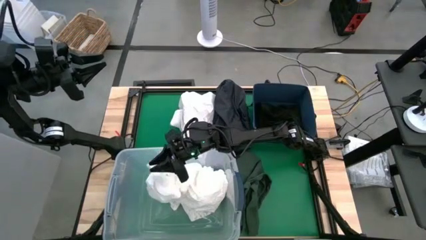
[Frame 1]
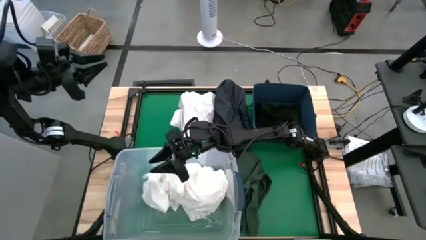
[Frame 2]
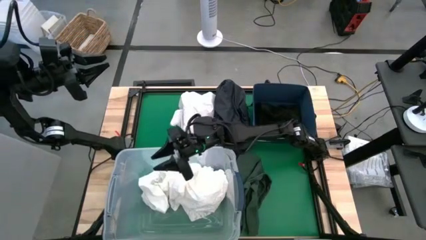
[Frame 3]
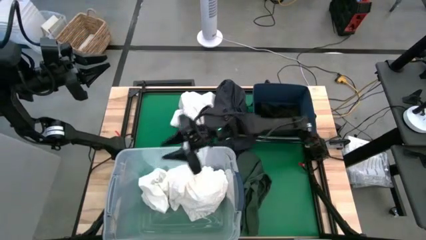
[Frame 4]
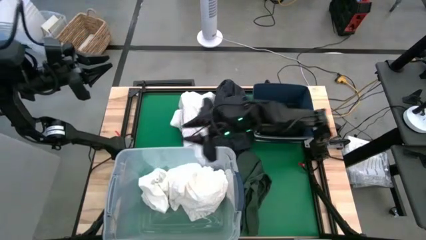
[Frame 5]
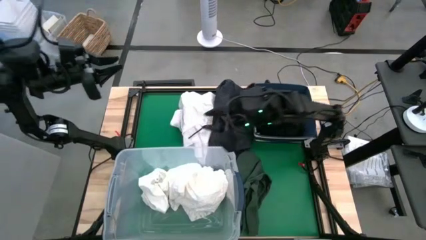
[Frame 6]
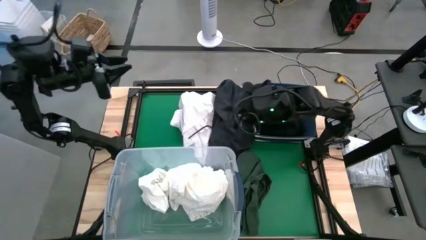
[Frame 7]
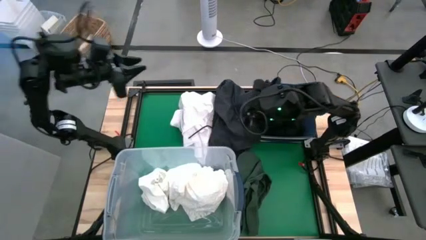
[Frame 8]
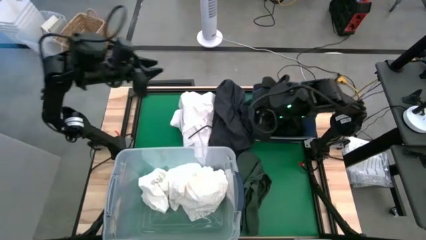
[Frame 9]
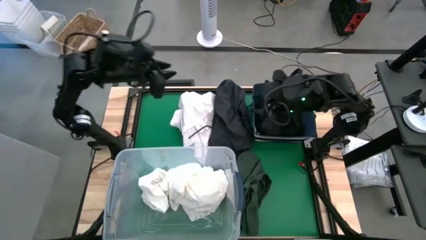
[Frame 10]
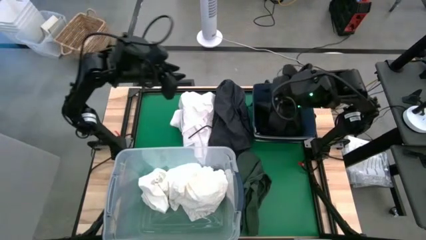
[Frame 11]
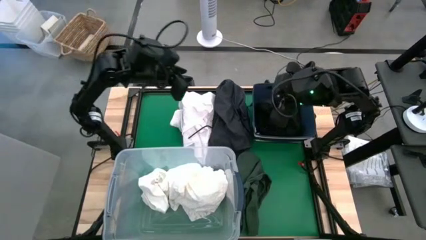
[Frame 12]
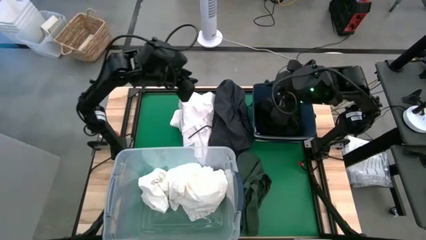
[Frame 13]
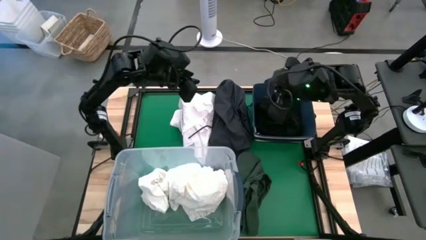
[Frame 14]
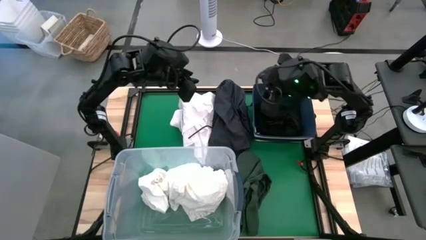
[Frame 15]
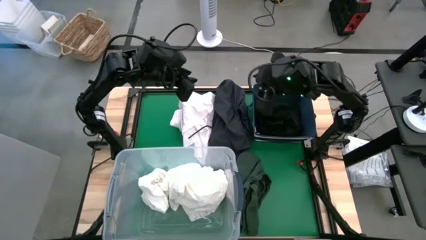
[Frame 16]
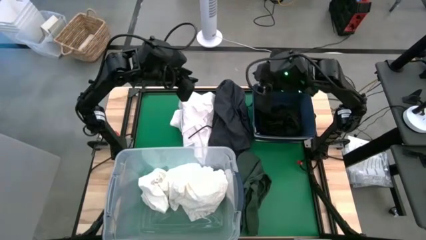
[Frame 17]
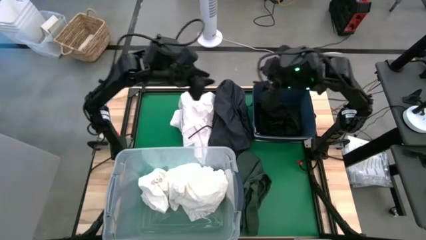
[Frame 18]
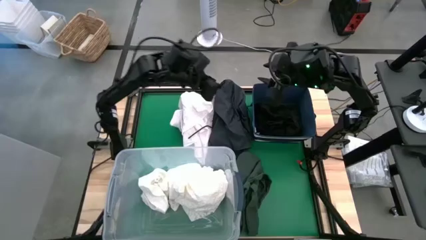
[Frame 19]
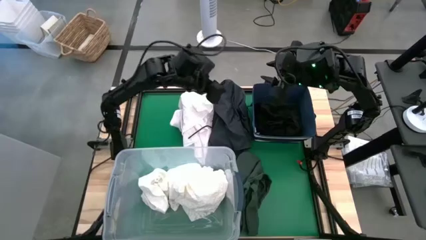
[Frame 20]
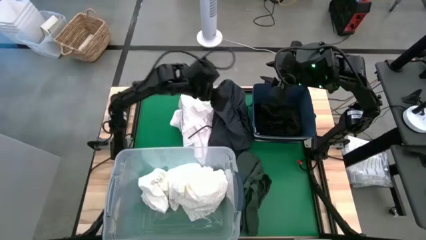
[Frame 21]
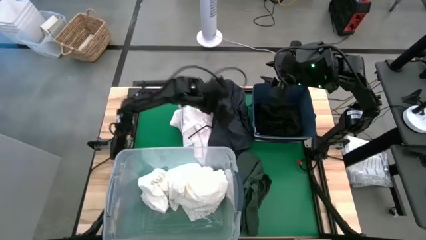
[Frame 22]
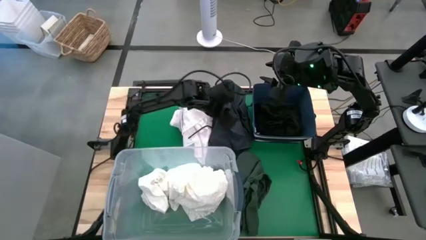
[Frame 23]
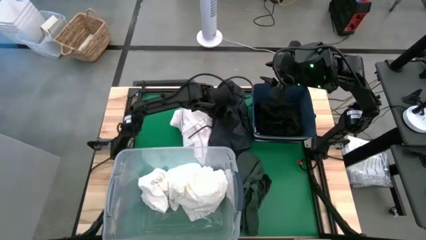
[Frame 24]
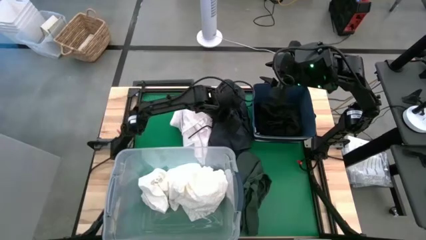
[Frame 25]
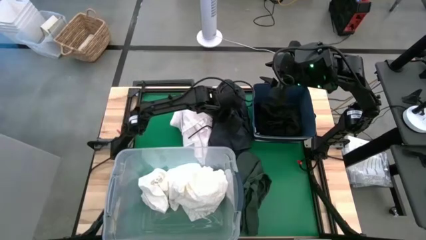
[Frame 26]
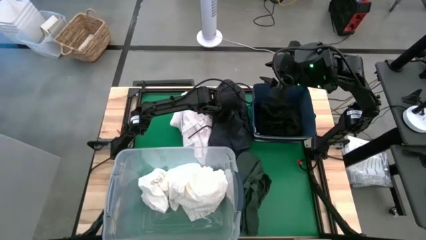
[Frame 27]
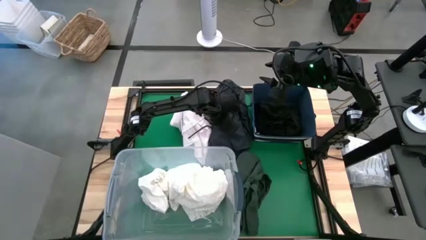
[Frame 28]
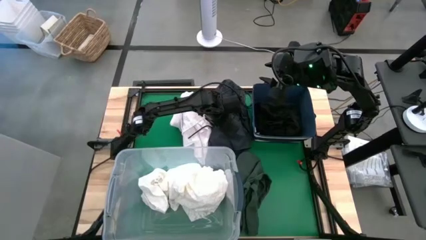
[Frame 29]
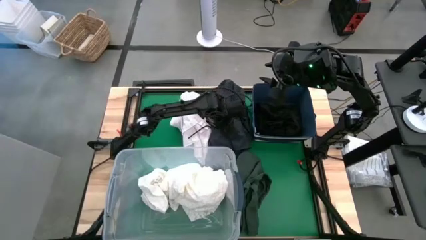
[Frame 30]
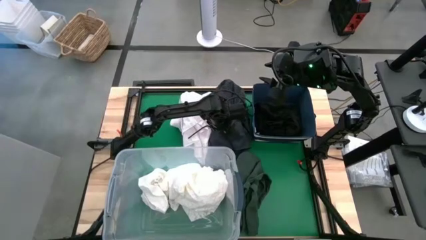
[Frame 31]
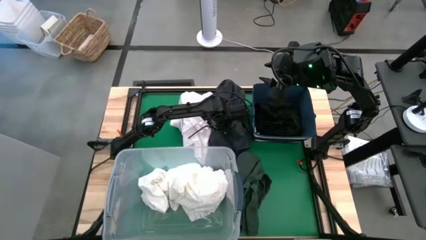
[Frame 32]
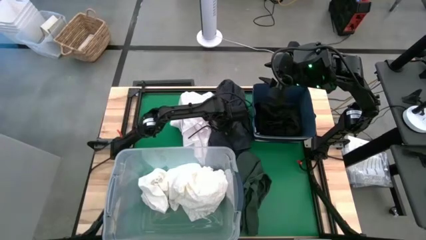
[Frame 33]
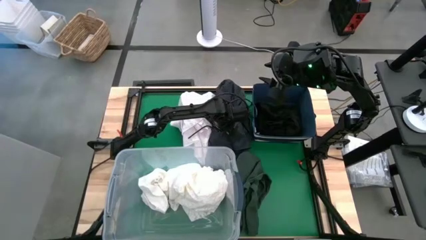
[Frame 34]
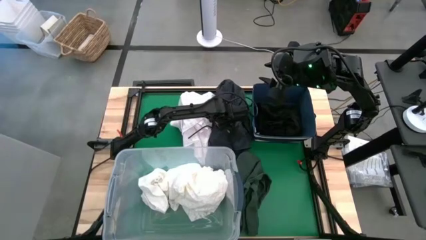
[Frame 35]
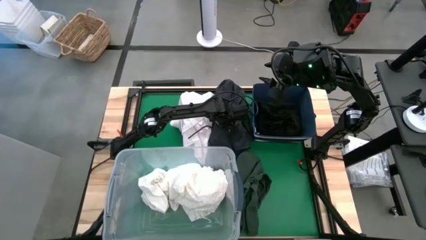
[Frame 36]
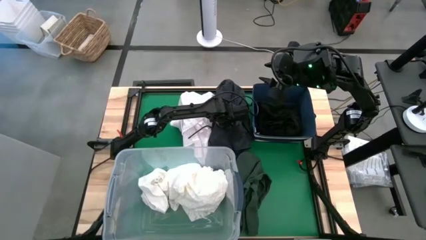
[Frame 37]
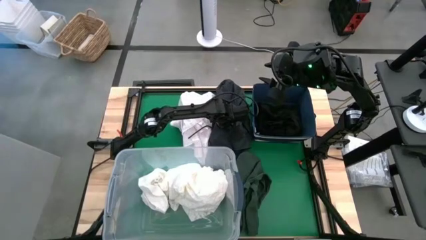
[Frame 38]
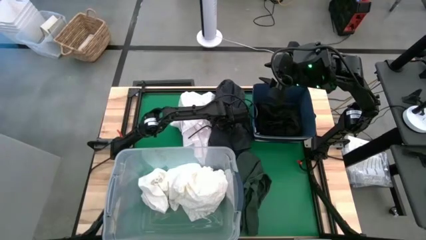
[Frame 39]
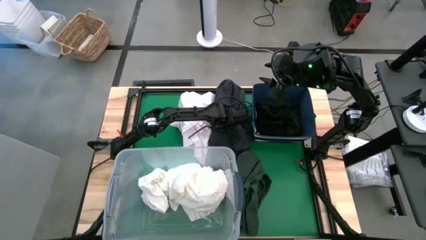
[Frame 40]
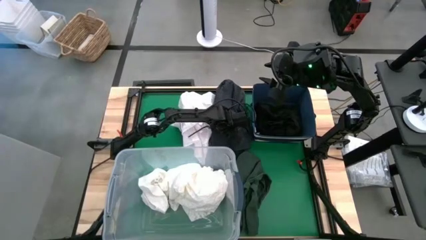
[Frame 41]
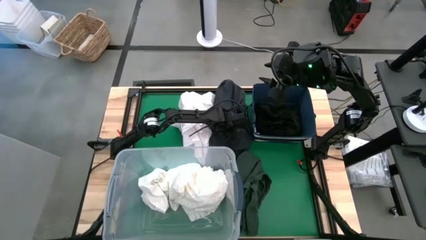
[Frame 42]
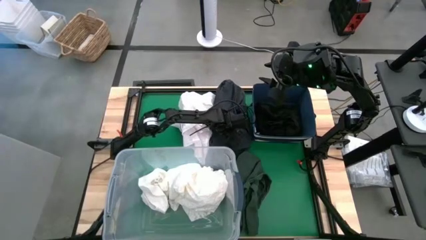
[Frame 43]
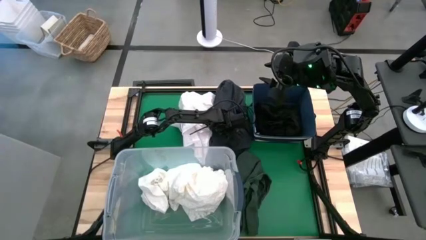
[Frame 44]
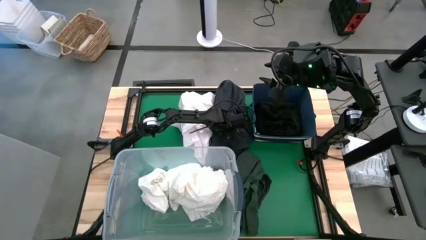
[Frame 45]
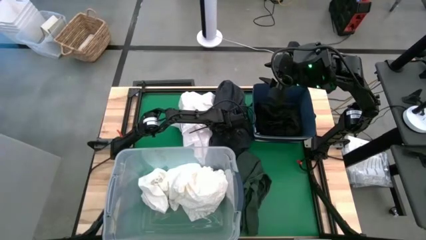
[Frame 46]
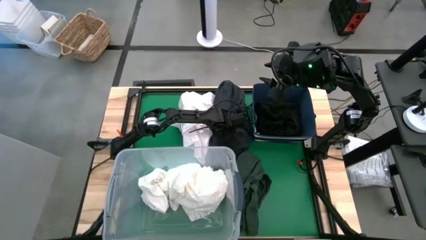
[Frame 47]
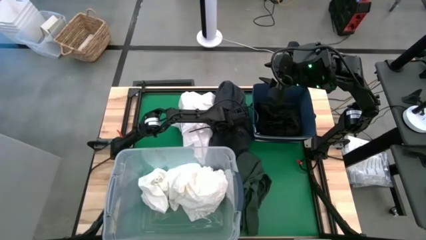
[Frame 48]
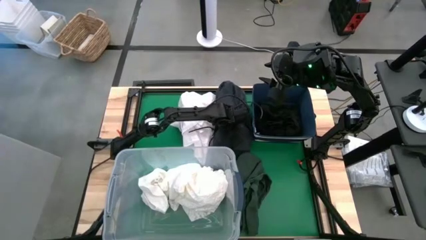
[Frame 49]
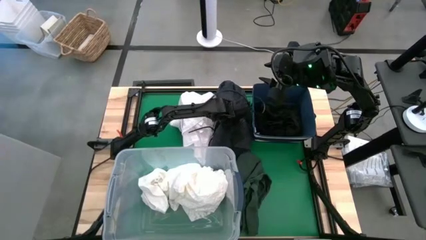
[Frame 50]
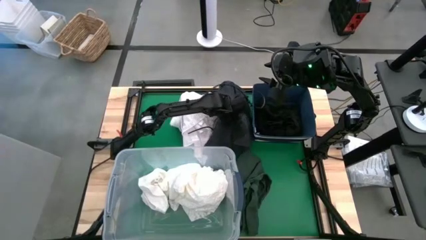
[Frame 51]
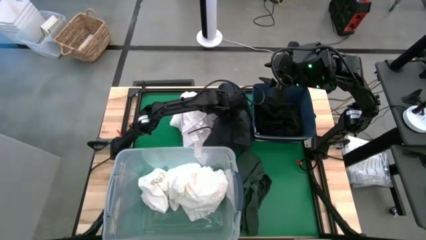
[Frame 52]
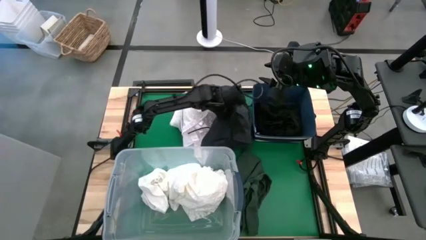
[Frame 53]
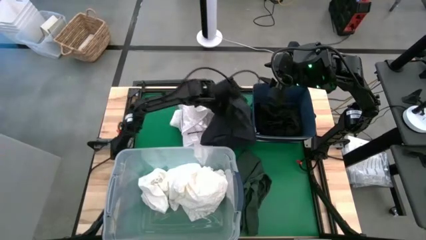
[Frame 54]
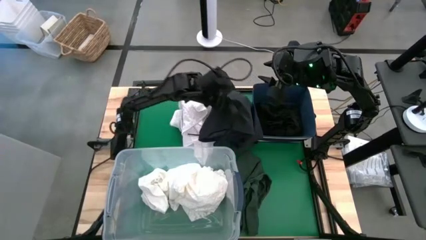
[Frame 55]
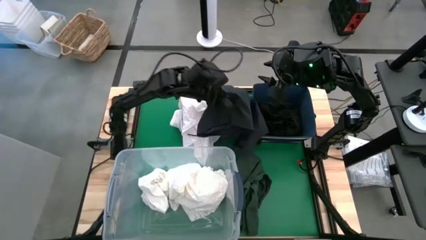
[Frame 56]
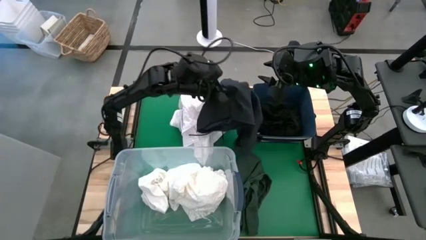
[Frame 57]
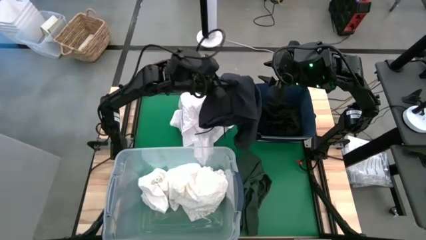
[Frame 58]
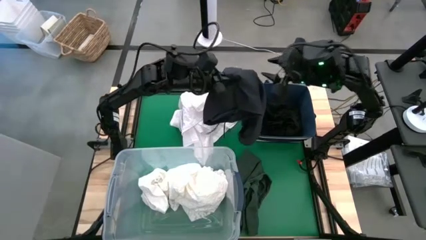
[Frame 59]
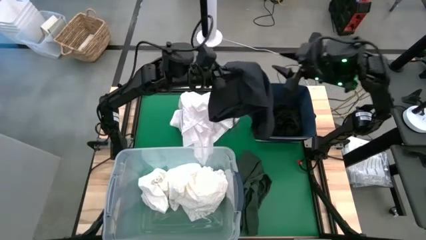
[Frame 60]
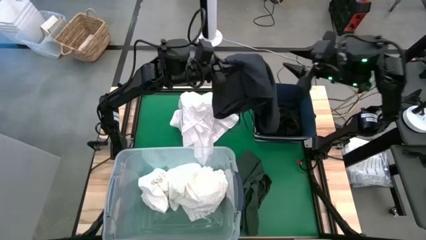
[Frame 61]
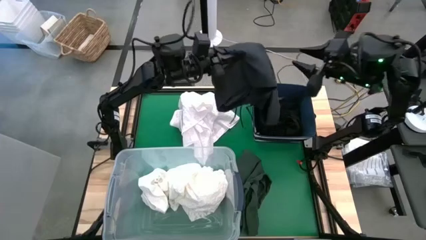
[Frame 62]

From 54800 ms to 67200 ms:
Put the black short pants into the blue laundry organizer
